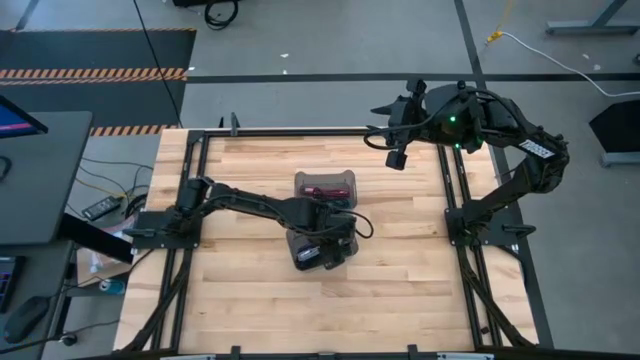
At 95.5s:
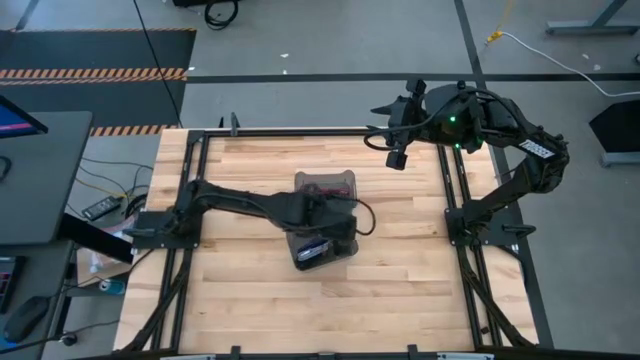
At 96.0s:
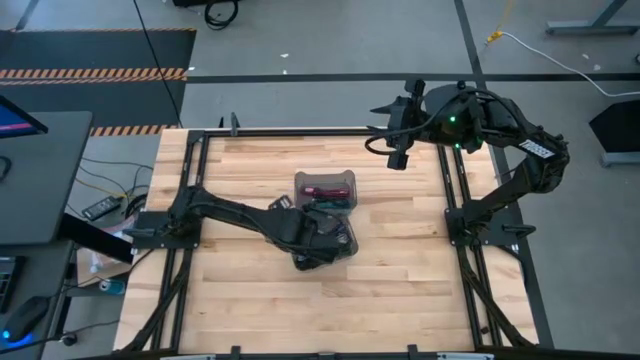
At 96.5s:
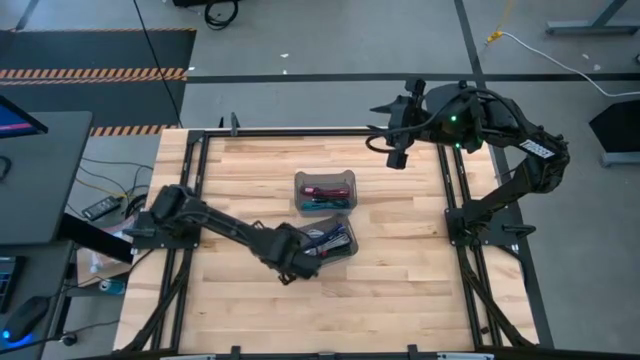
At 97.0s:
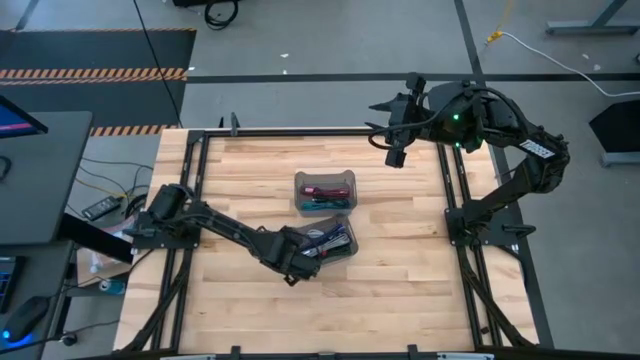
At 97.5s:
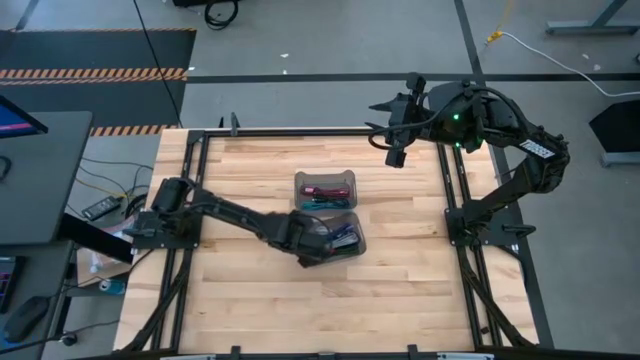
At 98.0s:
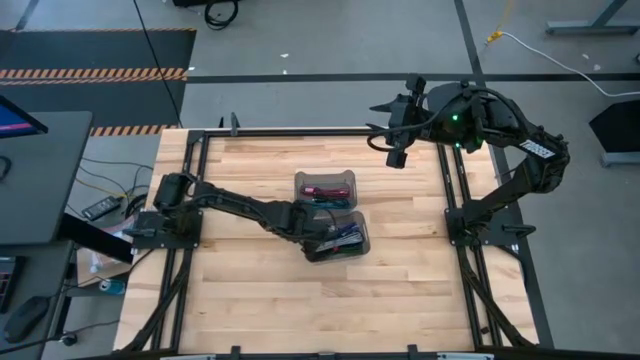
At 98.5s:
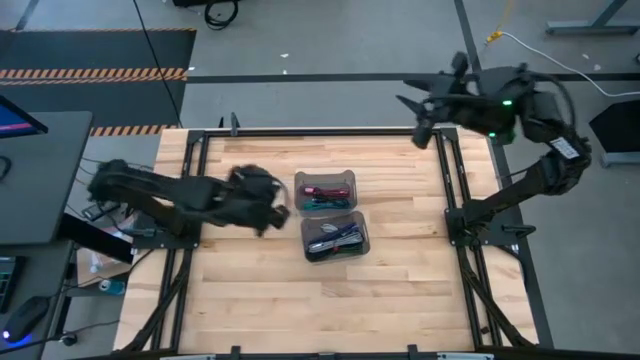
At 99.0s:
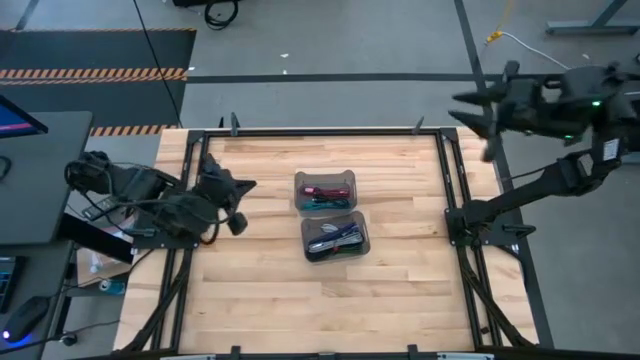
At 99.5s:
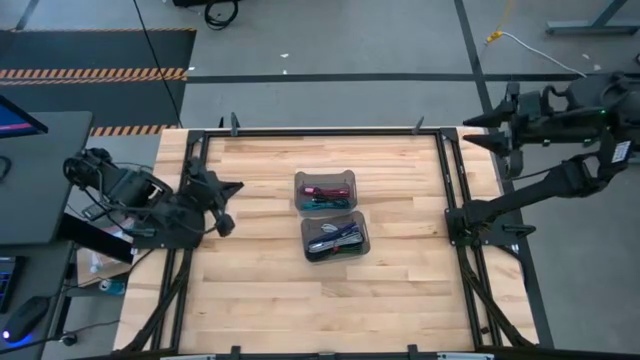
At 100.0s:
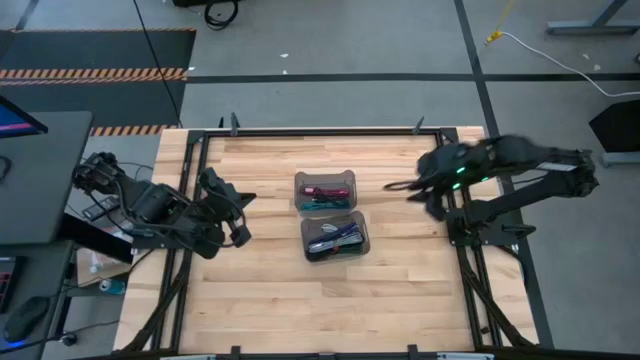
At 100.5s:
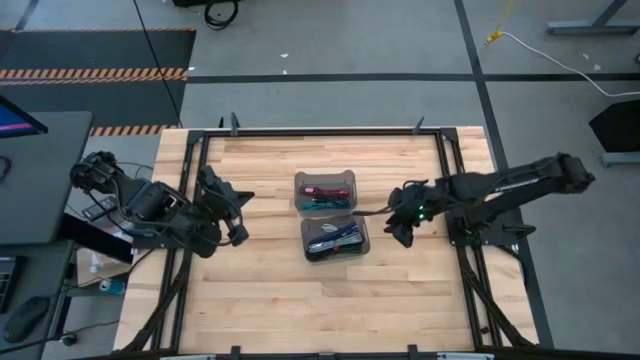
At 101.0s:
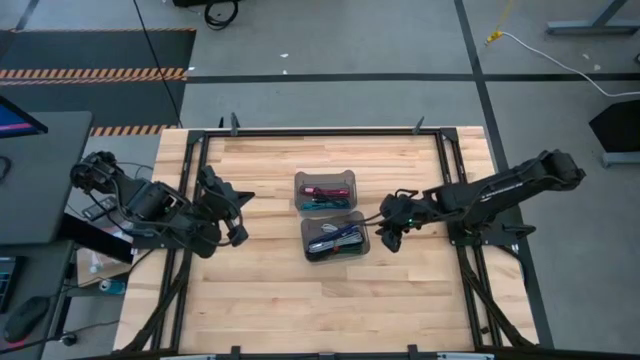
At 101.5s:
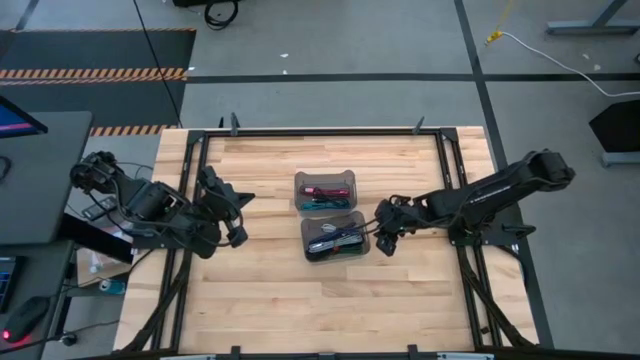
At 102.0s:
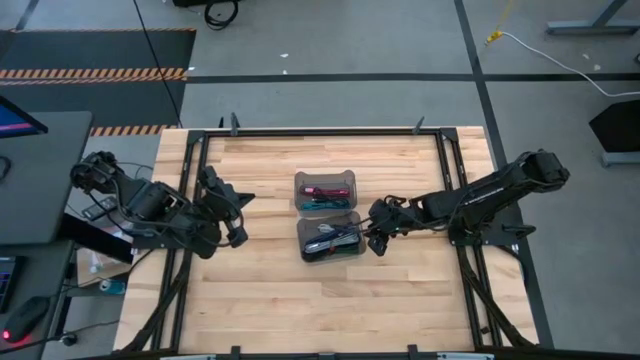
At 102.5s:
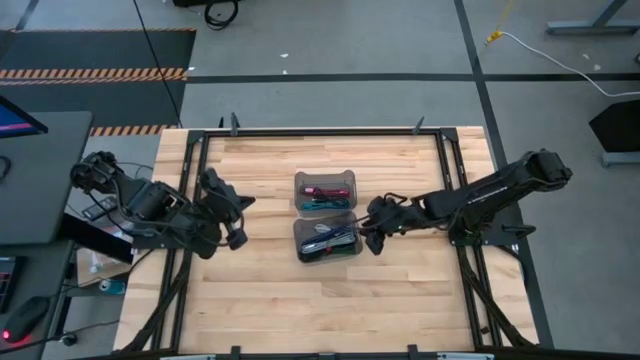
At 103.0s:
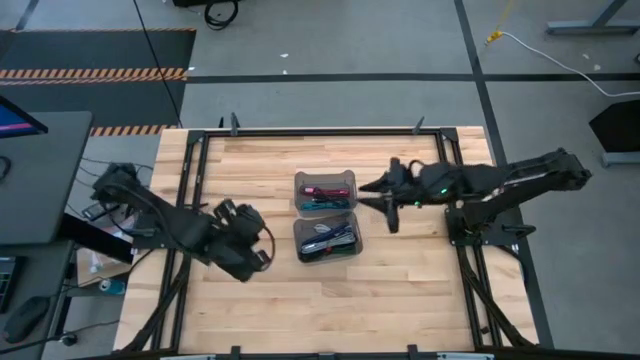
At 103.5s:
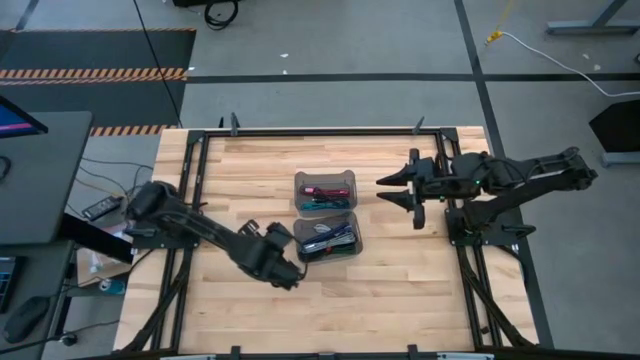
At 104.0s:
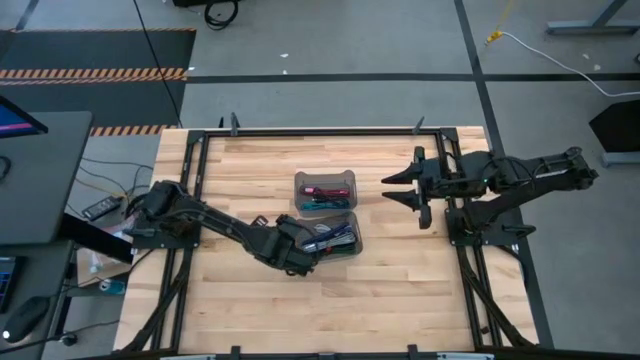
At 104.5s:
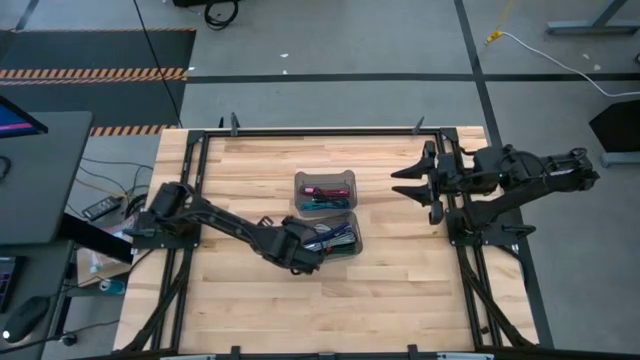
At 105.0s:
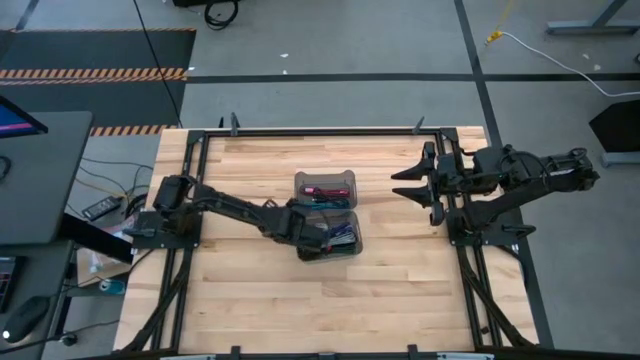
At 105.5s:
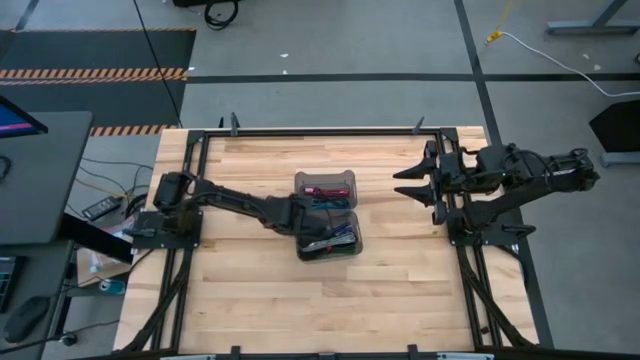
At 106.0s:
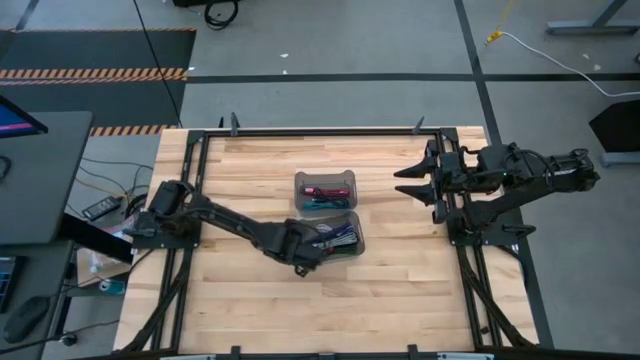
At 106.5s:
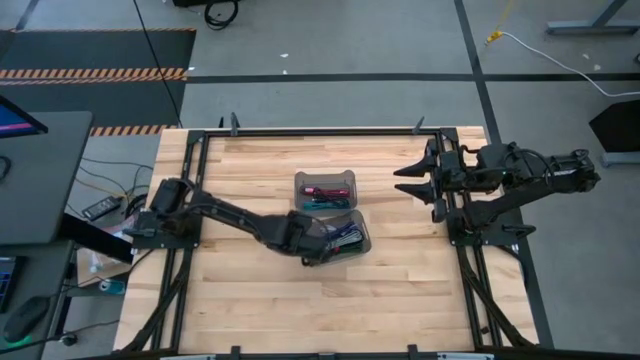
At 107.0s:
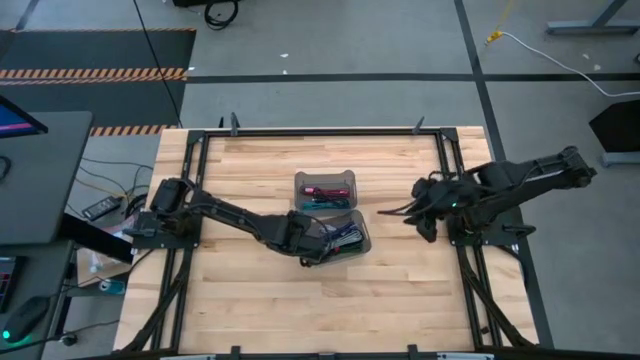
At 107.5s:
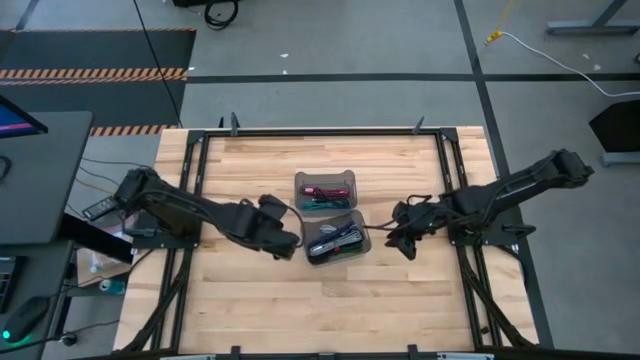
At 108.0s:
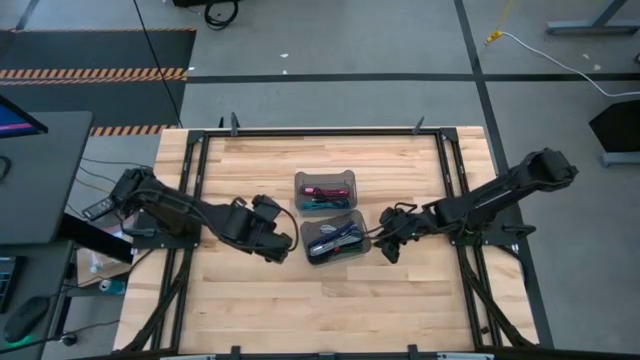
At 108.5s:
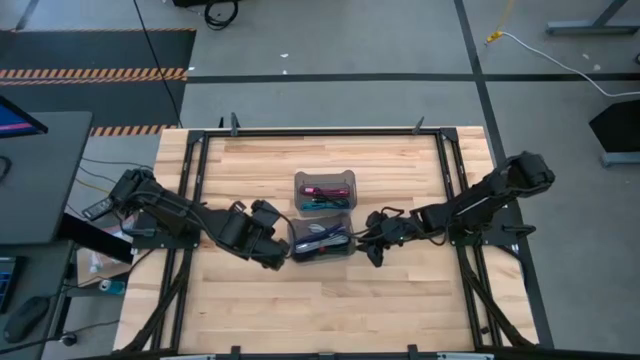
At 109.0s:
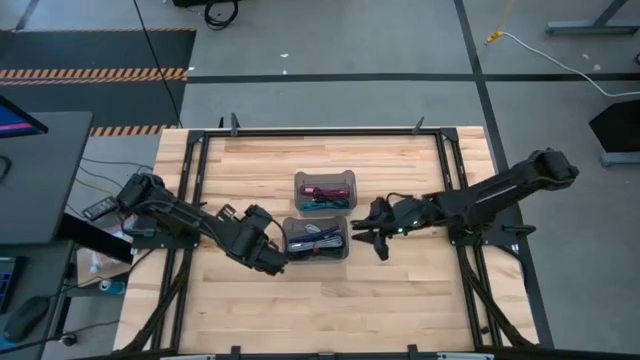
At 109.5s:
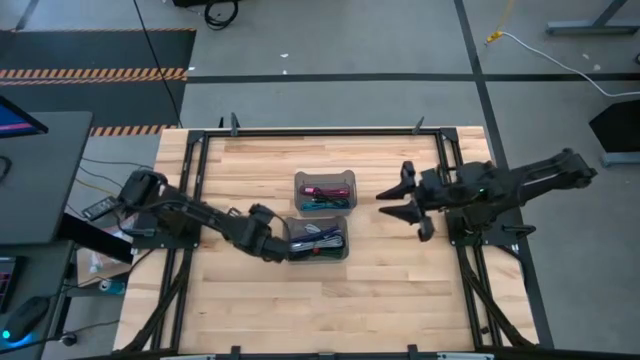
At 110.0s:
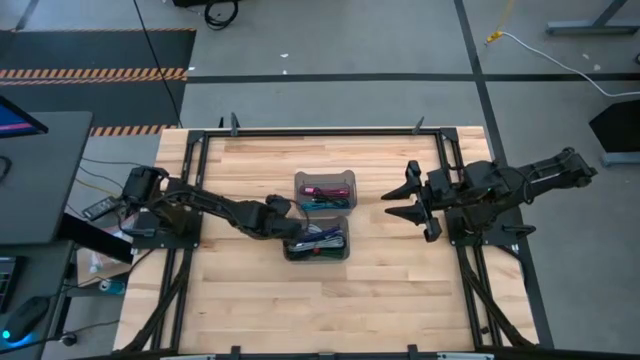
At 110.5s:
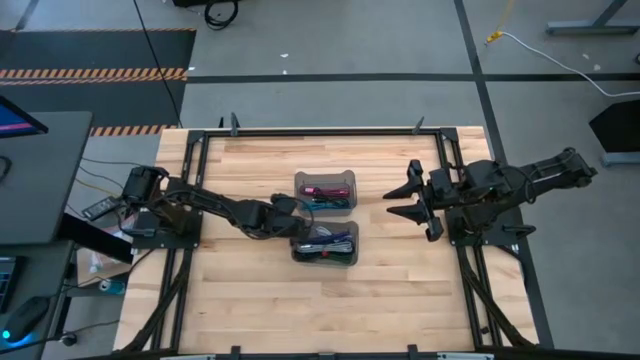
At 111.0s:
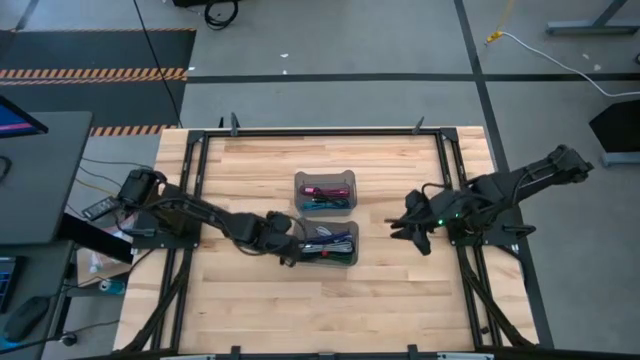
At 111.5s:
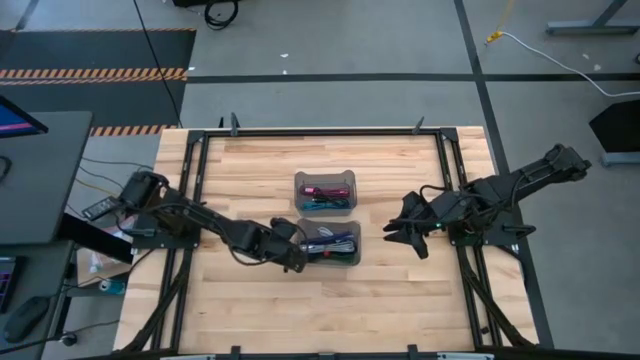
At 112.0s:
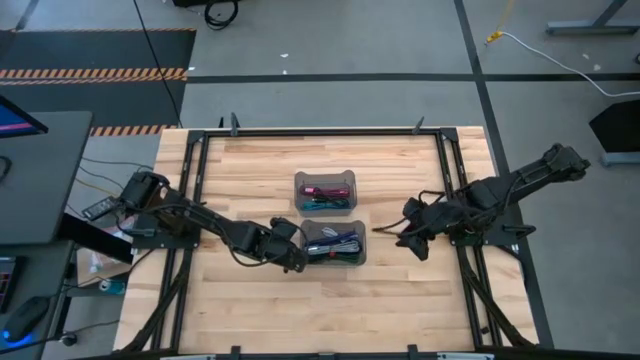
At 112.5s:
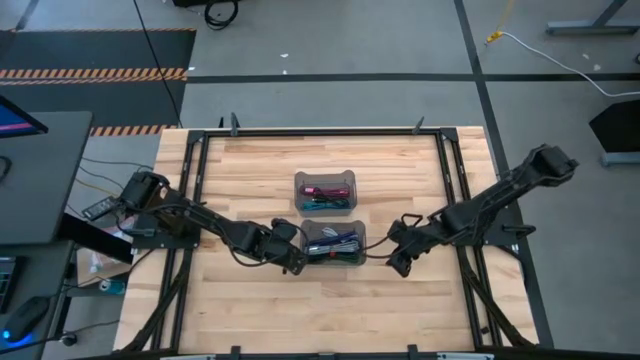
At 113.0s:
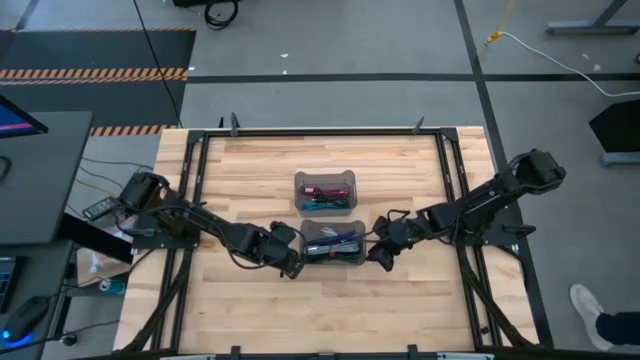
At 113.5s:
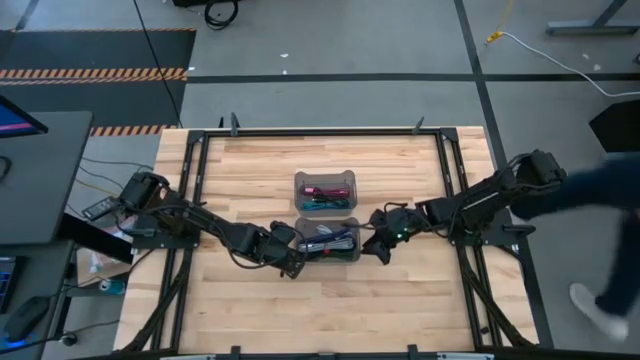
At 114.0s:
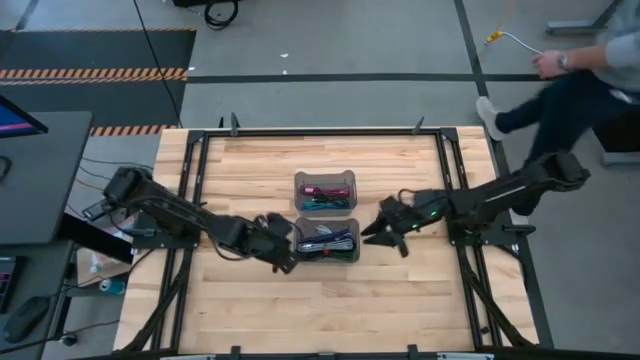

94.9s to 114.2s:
Task: Pick and place USB-C Cables
Adjust the bottom black transparent bin
